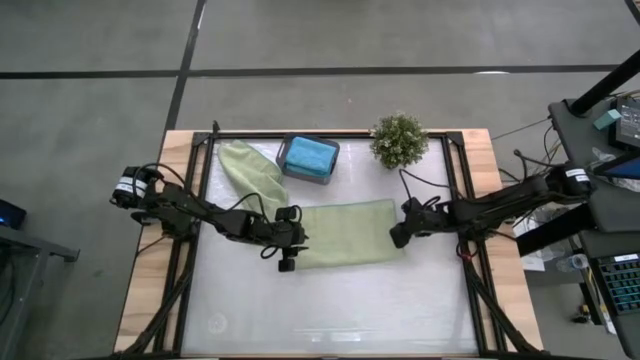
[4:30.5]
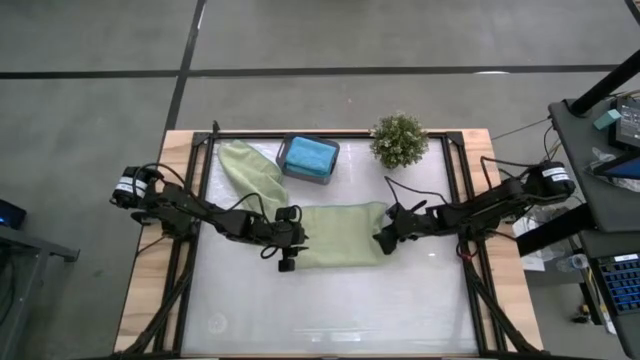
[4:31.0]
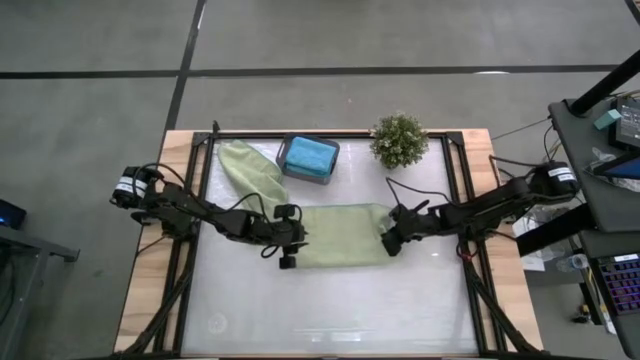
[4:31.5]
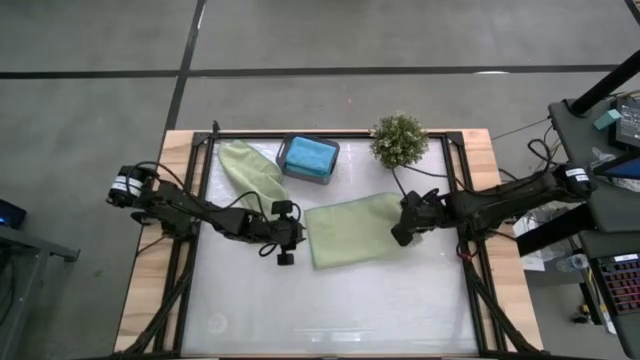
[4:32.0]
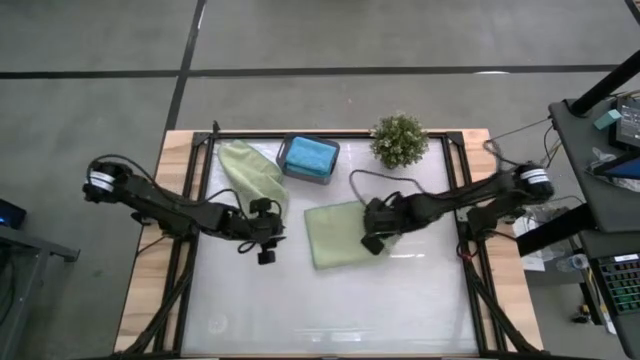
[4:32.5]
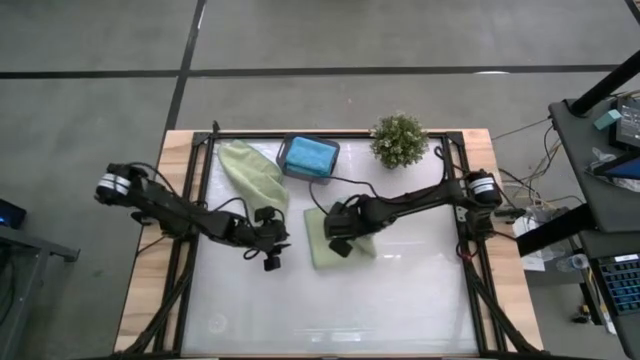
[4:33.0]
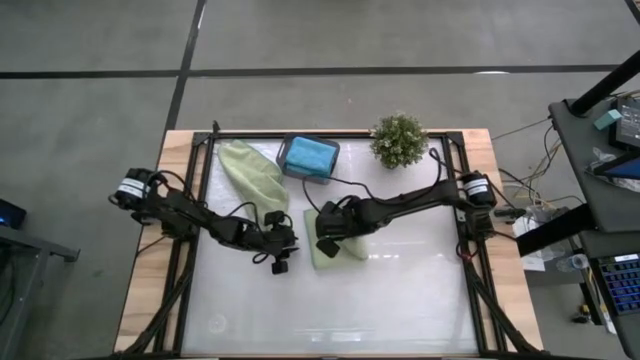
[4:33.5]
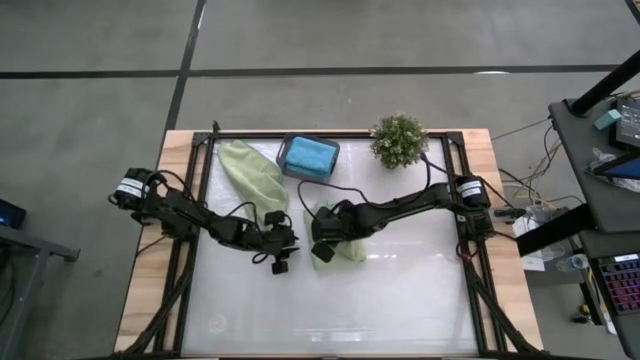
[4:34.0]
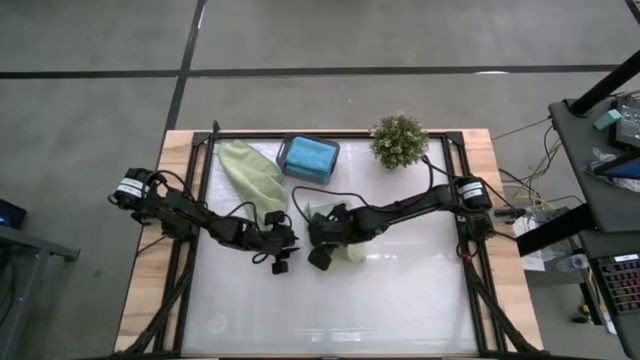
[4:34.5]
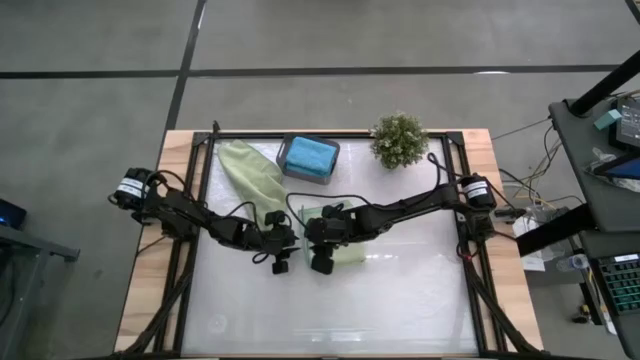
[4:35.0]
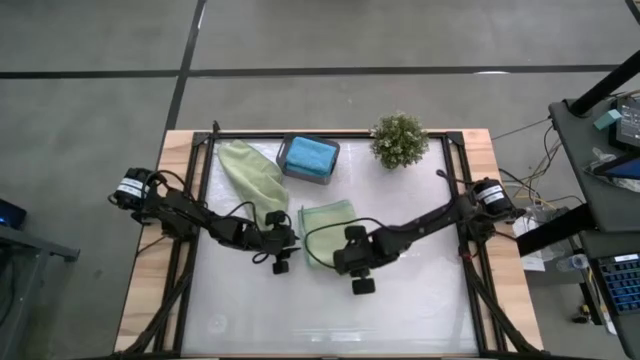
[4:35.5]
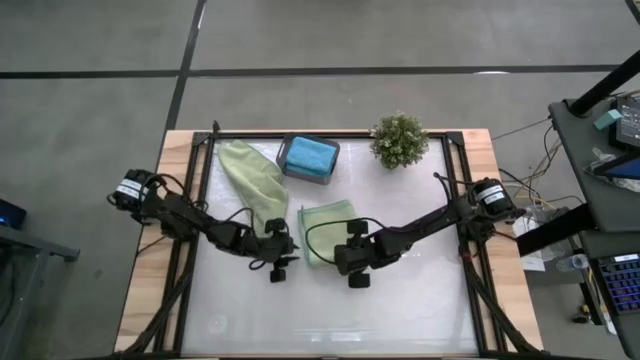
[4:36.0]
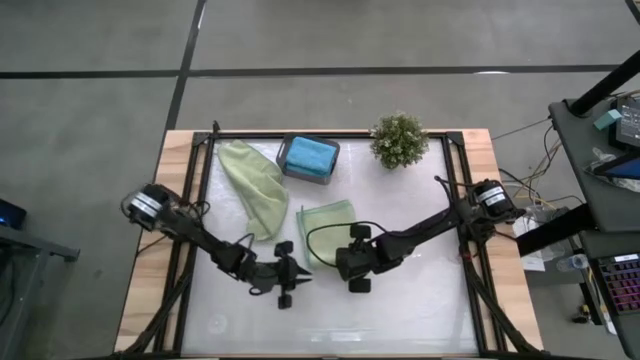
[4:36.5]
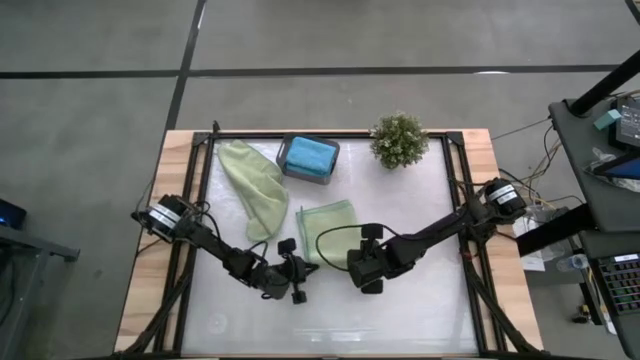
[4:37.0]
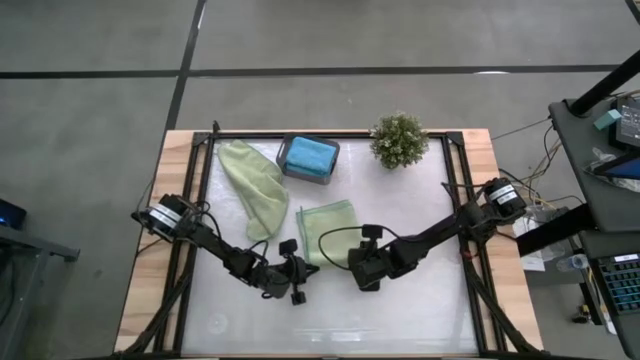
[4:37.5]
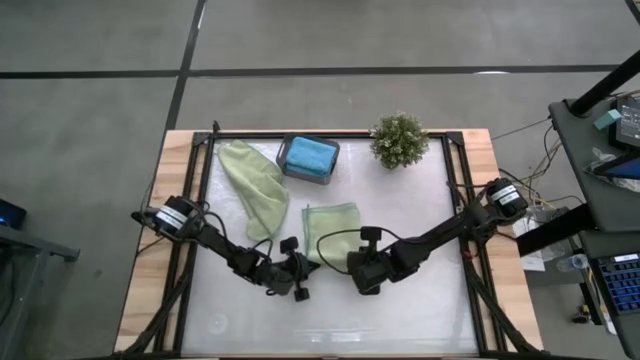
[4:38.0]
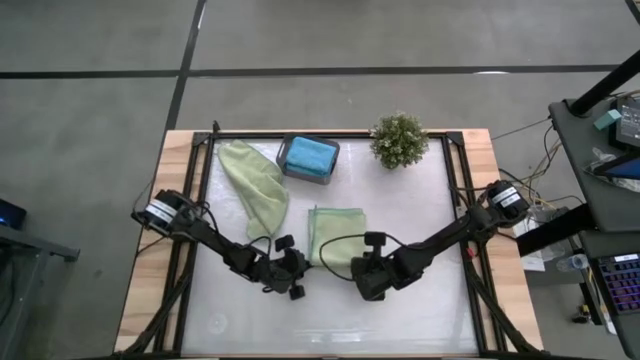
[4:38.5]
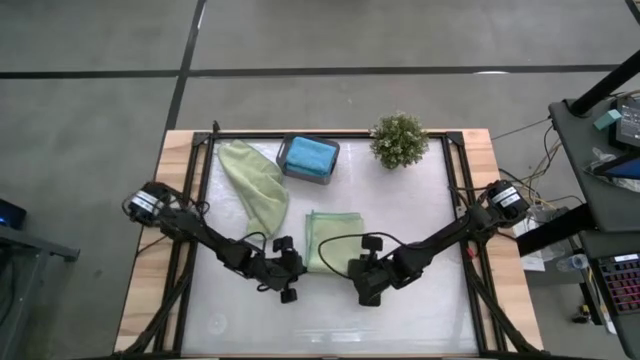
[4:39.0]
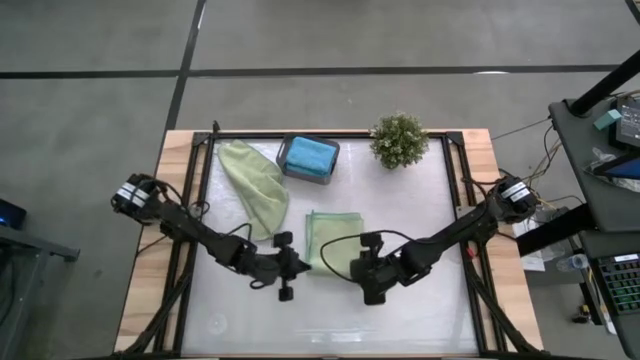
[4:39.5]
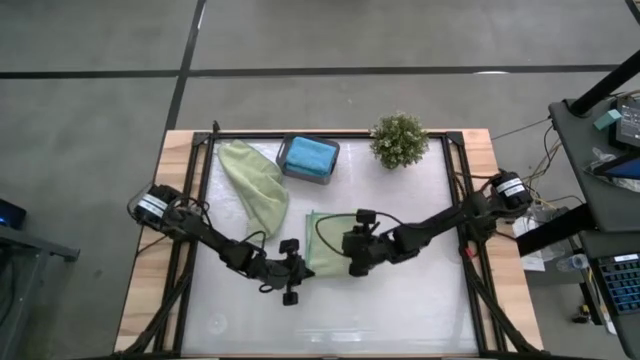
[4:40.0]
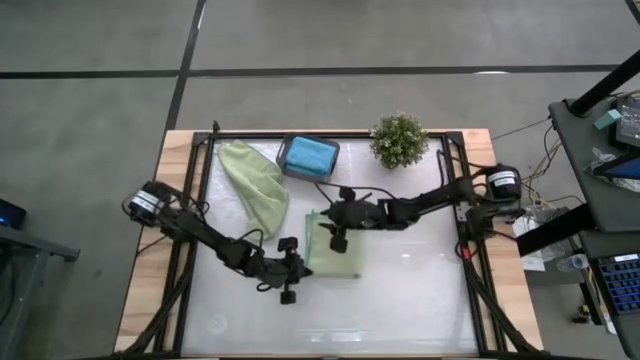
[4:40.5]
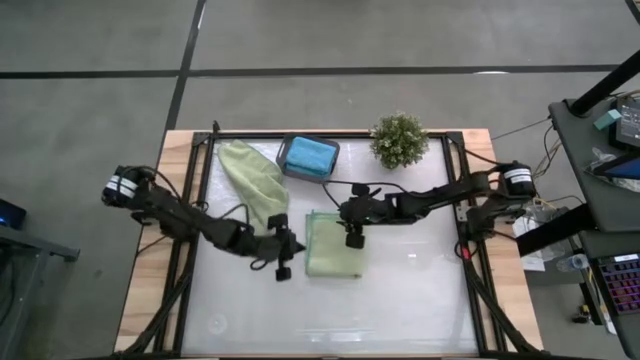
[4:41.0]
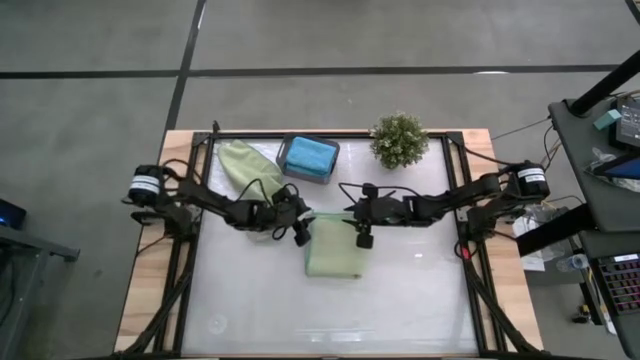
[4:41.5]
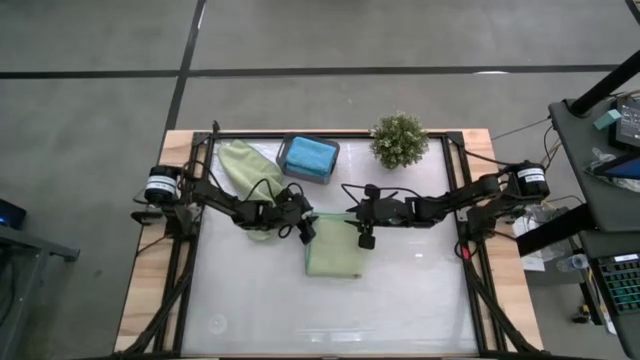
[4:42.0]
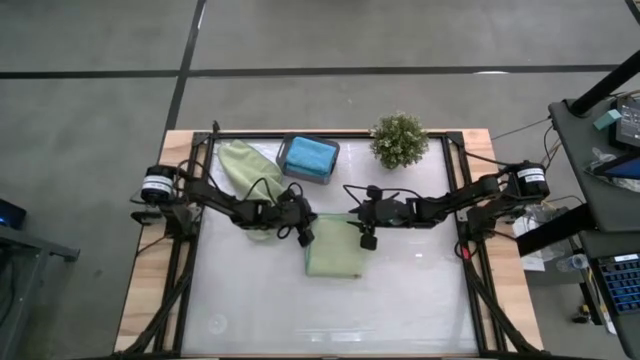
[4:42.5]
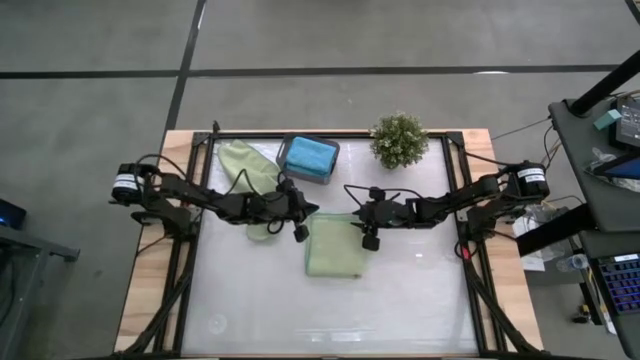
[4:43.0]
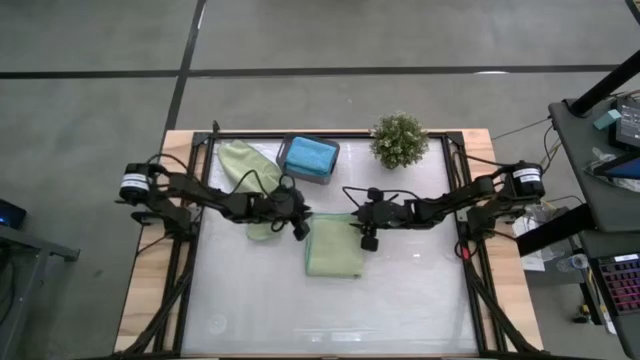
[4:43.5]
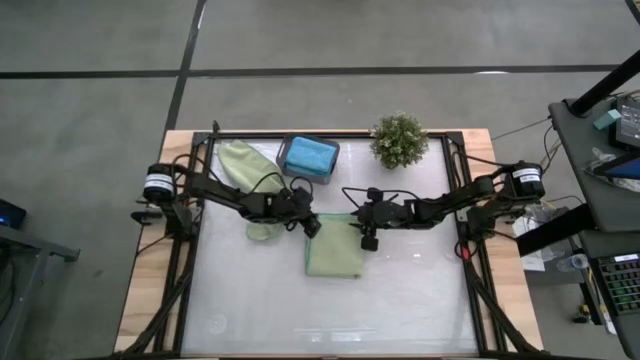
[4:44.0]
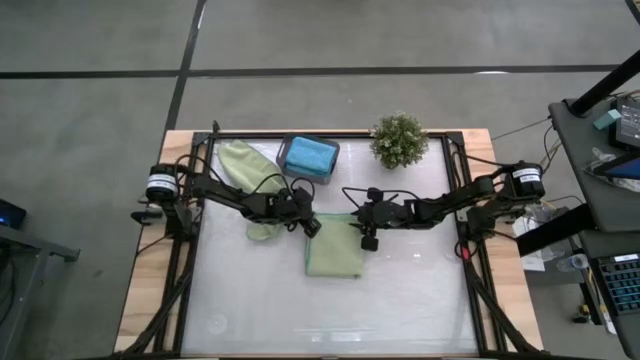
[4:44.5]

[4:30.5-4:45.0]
Task: Fold microfiber towels
Fold the bottom green microfiber towel

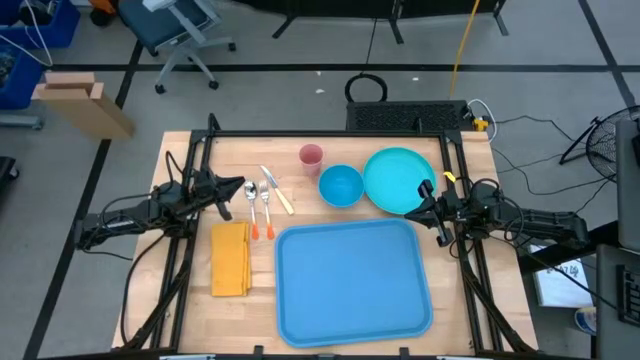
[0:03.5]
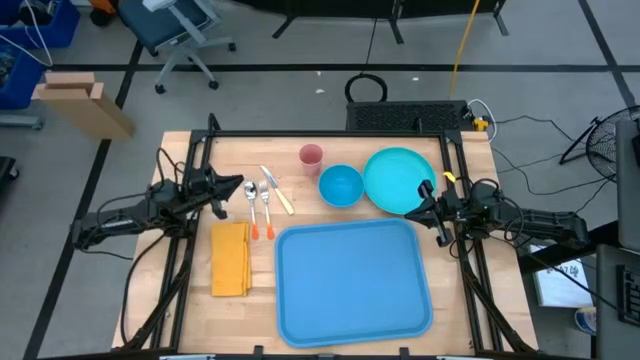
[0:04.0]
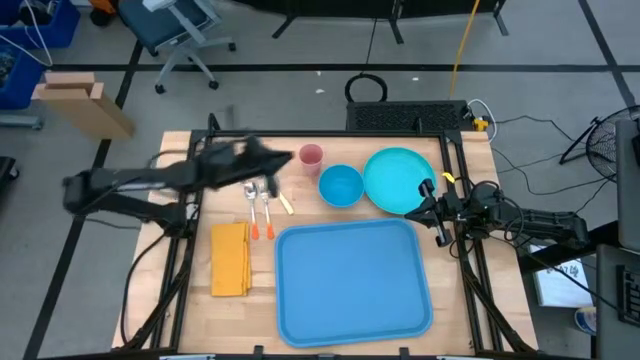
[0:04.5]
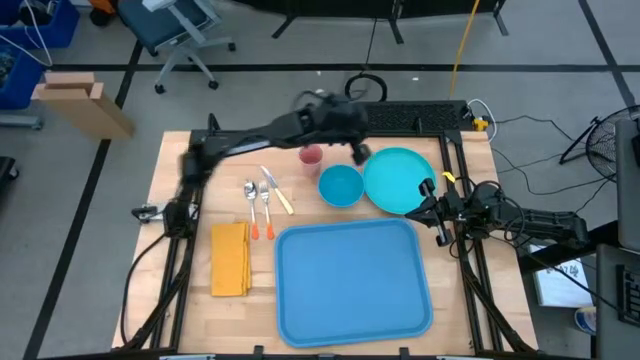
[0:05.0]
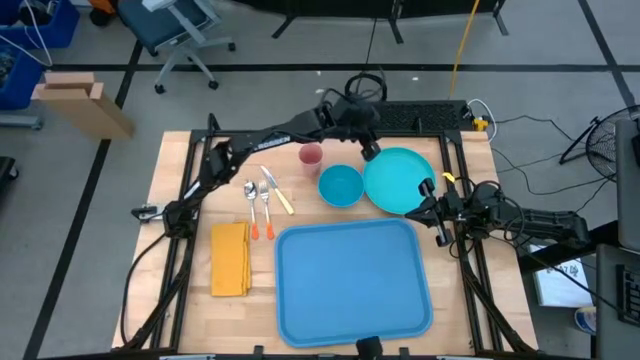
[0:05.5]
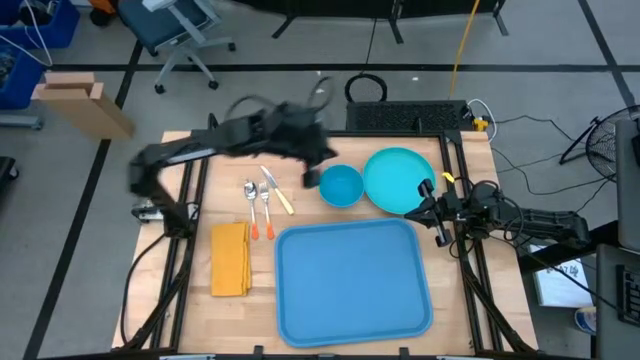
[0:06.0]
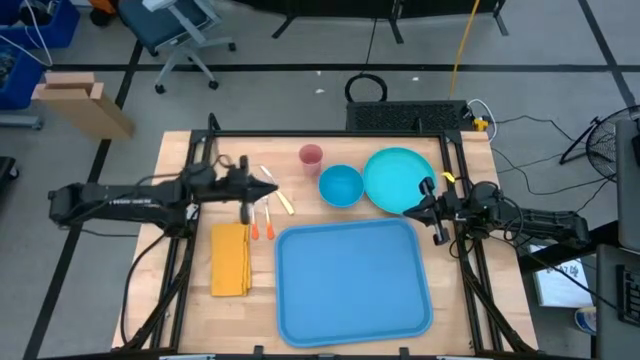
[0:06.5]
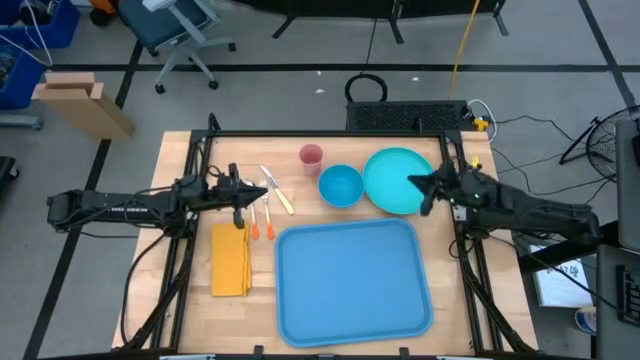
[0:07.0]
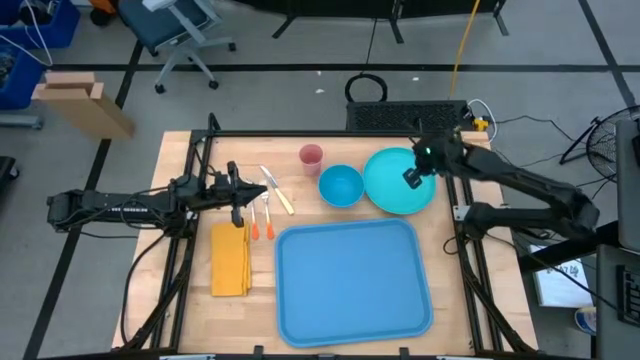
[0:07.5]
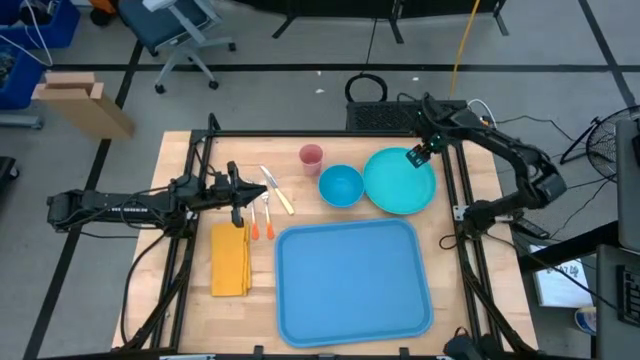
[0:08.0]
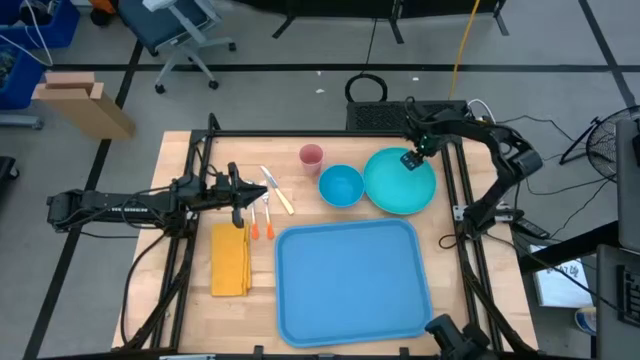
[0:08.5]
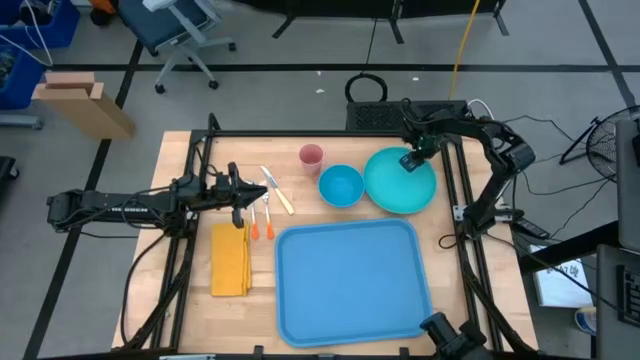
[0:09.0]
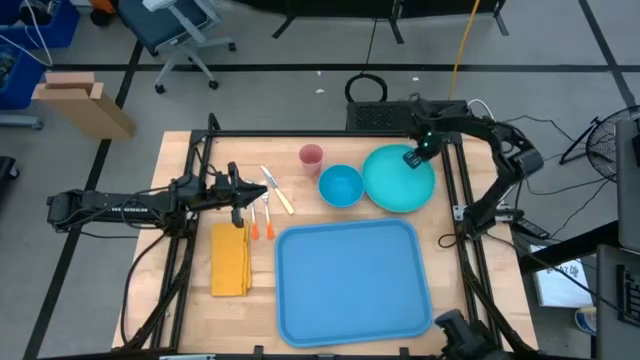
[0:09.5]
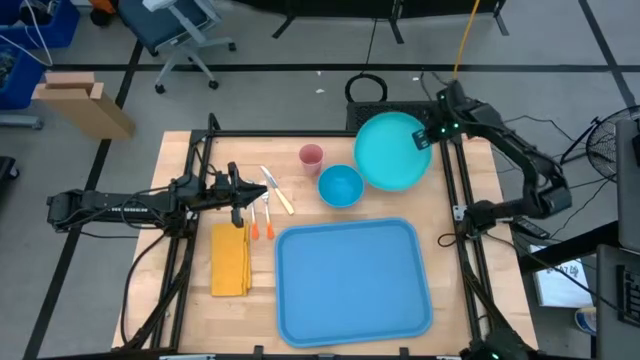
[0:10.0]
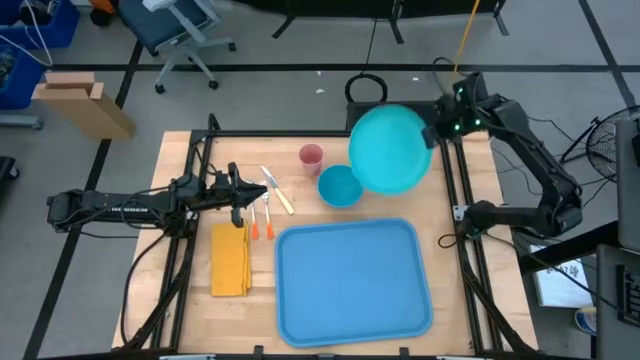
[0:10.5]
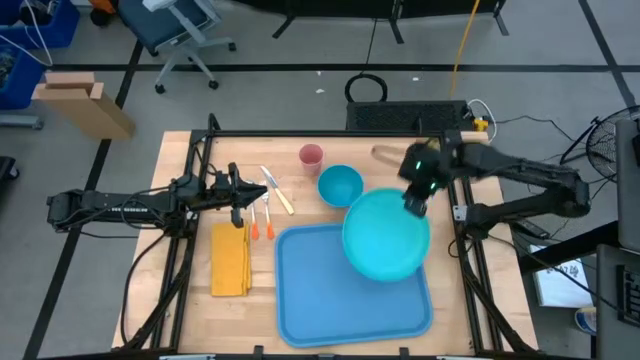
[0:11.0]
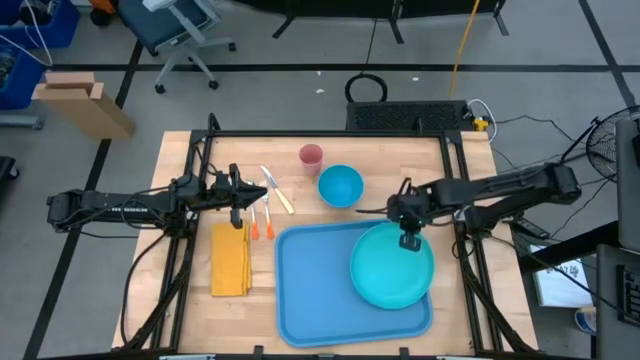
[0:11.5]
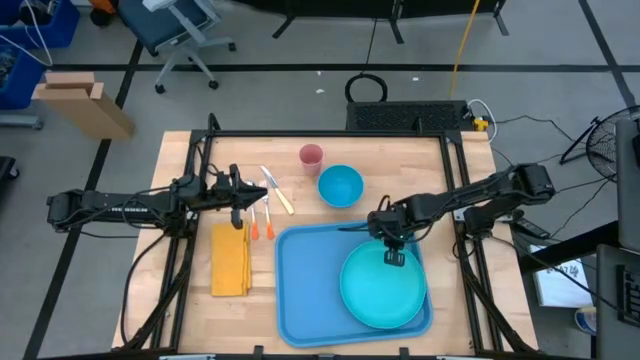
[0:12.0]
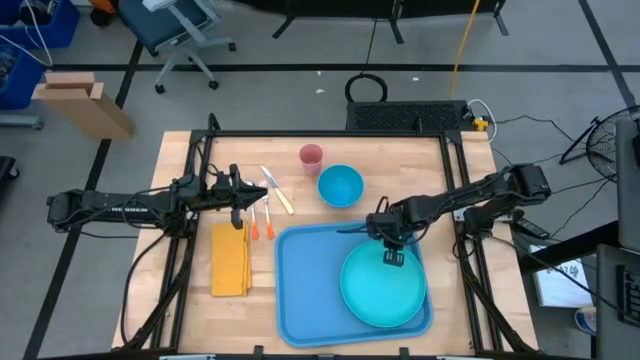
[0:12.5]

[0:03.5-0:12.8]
Task: Set up tray
Put the light green plate on the bottom right of the blue serving tray
